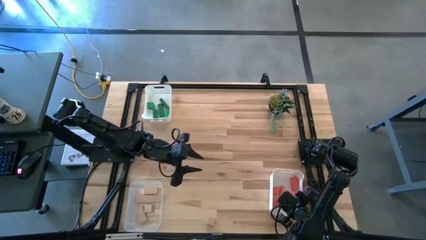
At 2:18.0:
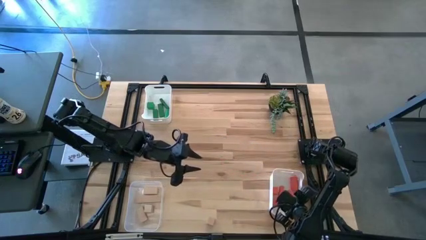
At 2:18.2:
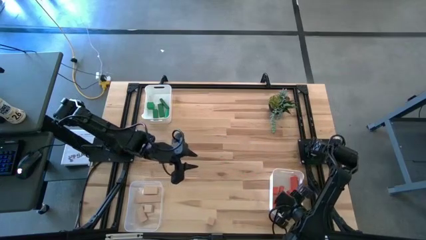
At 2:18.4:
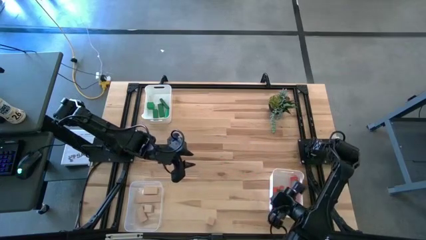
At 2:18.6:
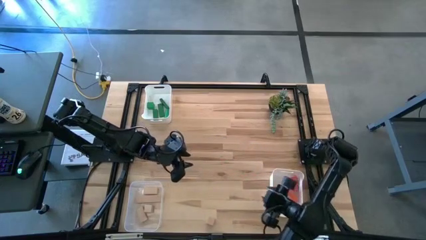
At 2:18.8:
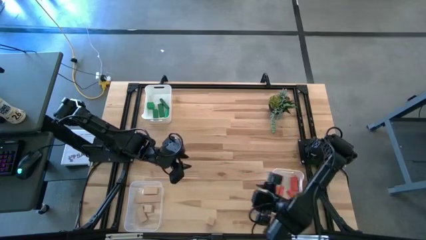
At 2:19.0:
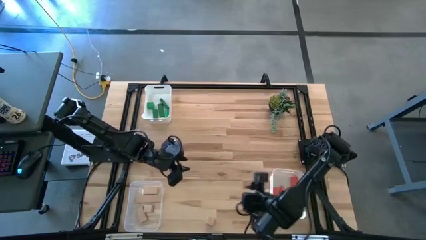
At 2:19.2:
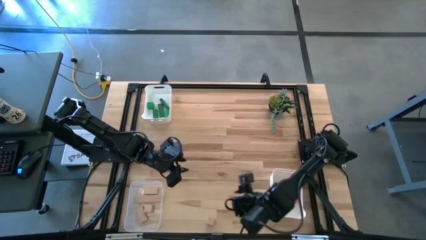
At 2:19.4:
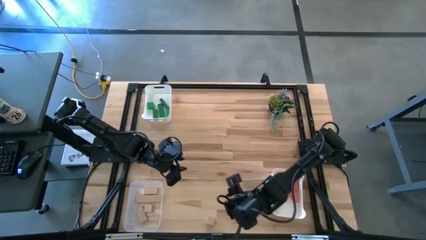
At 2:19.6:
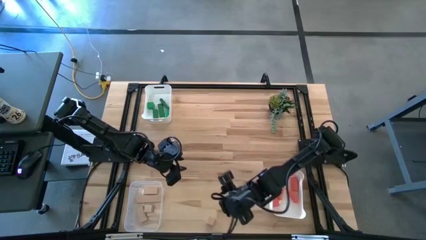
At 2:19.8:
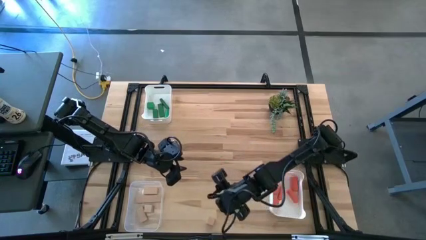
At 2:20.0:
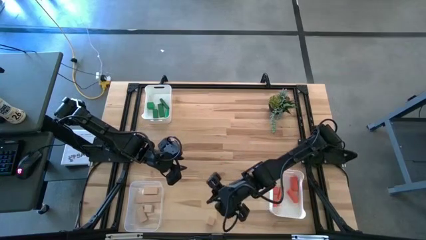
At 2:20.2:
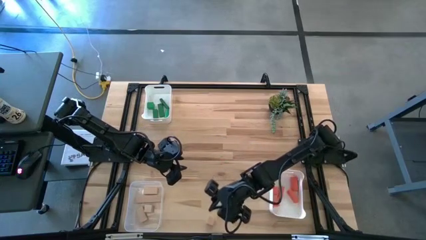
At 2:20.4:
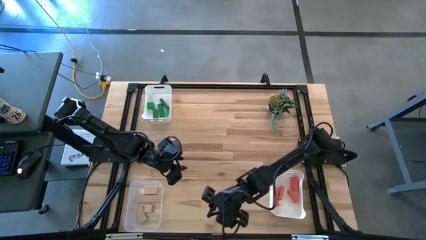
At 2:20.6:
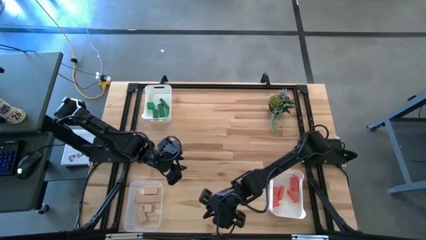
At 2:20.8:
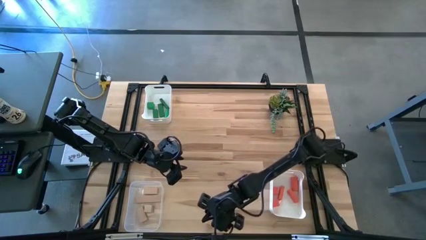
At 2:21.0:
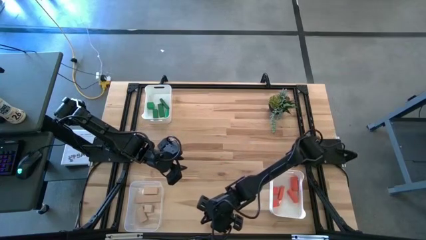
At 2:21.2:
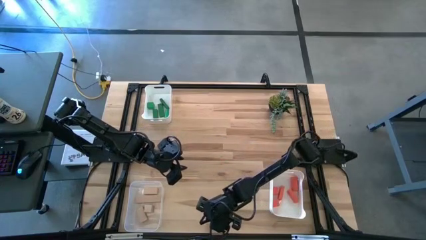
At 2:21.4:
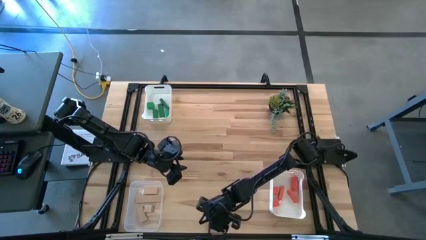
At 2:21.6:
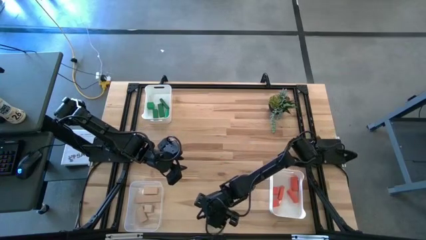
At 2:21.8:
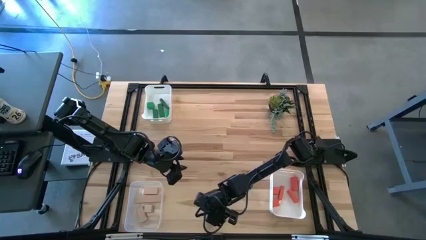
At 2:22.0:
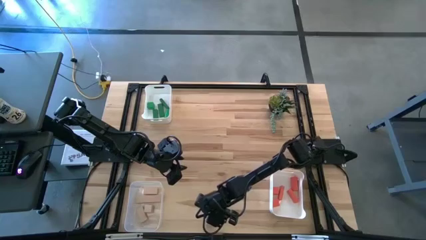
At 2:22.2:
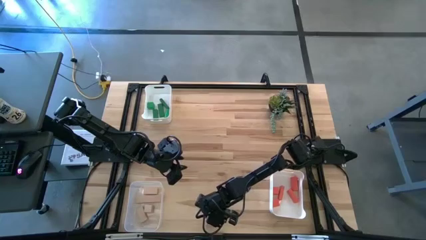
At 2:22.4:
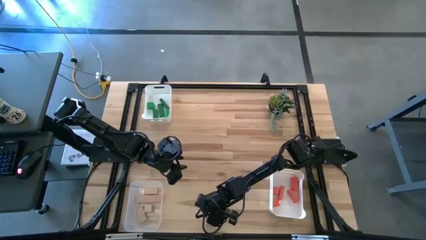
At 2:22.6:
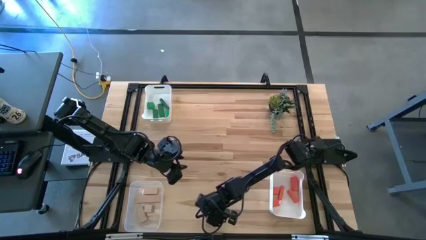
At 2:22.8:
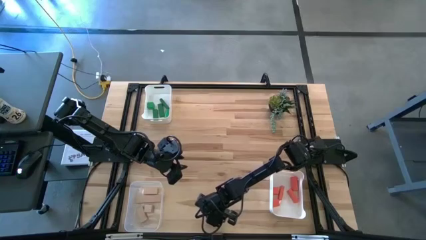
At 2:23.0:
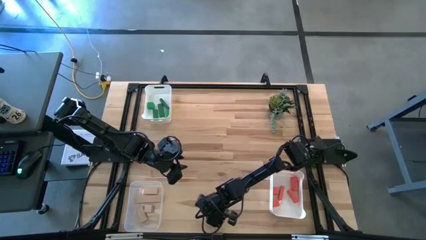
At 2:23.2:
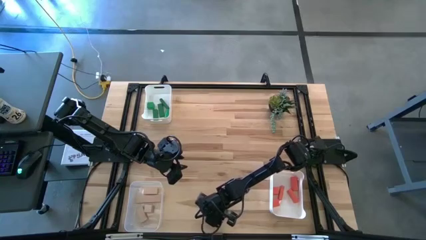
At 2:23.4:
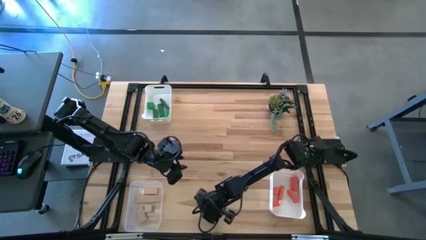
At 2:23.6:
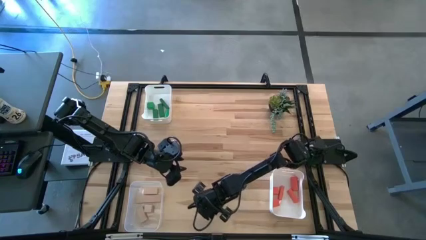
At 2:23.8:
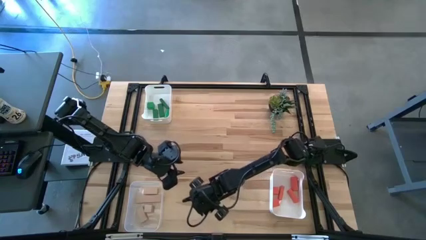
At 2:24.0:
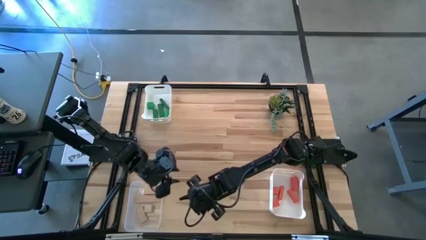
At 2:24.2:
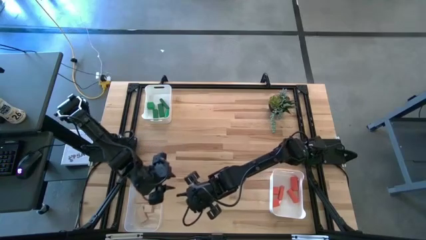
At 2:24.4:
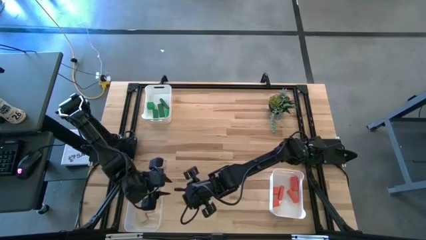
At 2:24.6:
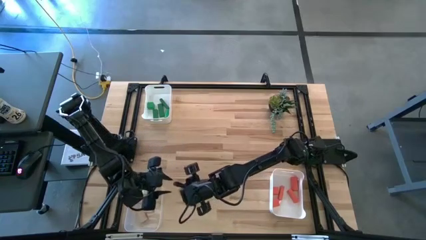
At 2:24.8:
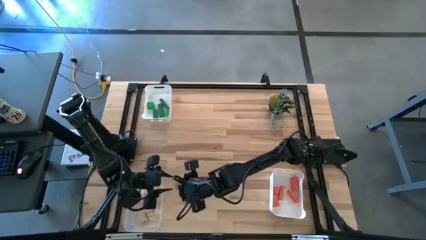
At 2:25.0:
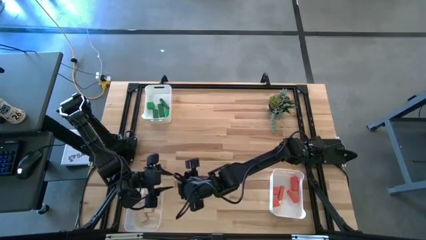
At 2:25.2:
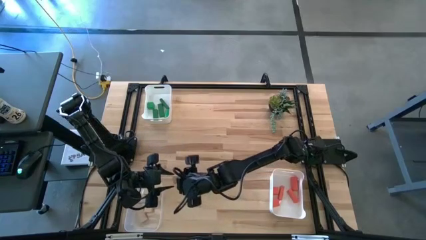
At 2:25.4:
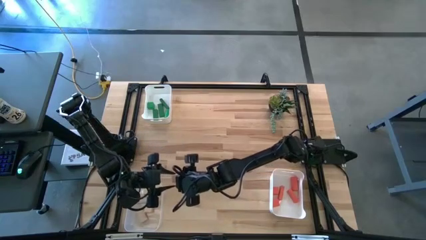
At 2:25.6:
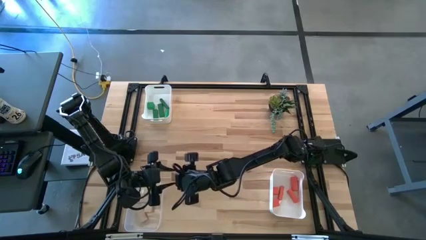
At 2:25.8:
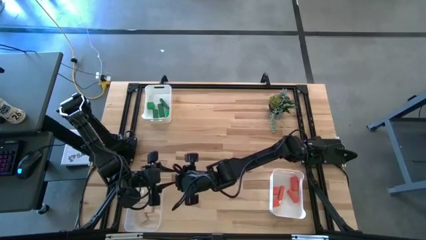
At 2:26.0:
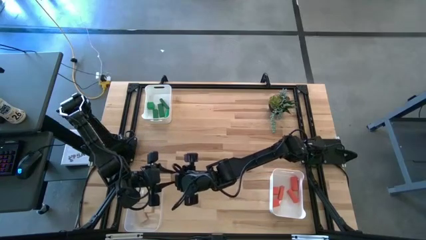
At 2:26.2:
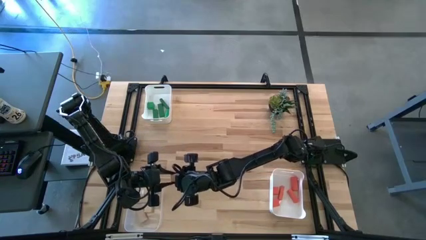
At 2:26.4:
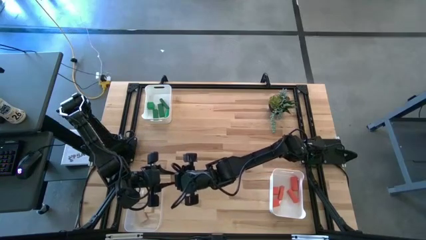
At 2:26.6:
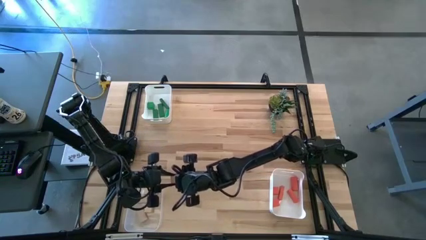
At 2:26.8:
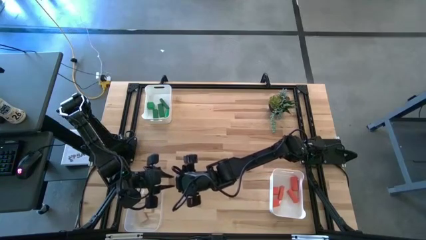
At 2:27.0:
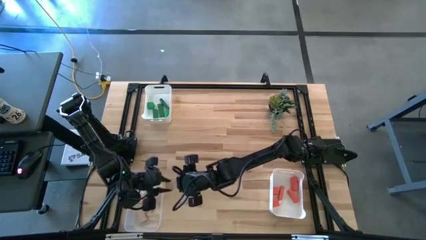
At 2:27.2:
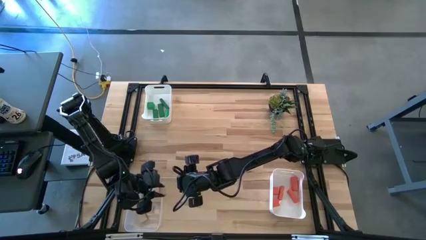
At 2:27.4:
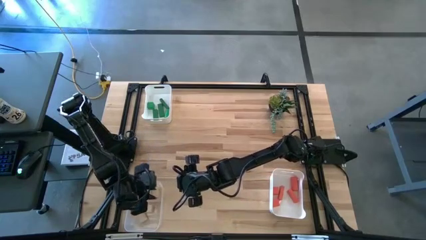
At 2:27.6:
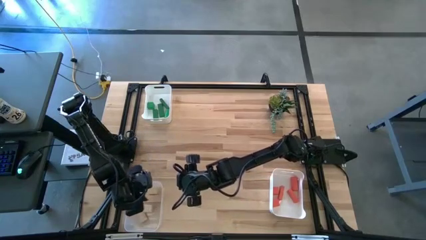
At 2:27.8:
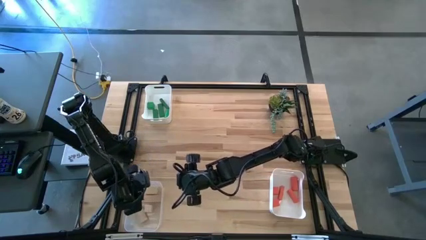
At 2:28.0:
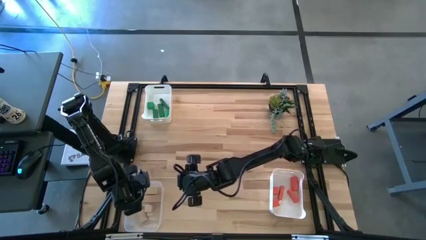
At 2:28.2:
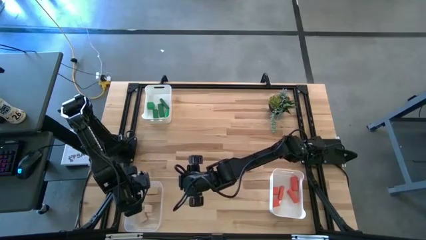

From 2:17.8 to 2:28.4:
Task: Sort & place blocks by color
Put the brown block into the transparent bin

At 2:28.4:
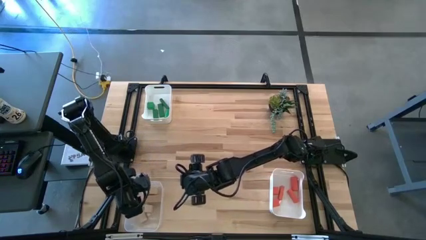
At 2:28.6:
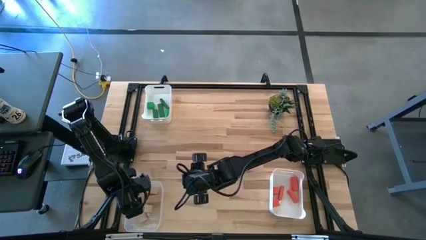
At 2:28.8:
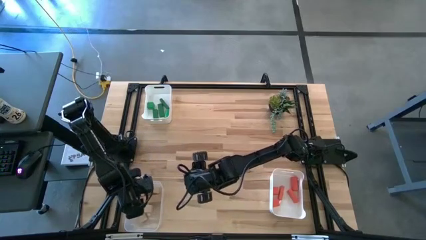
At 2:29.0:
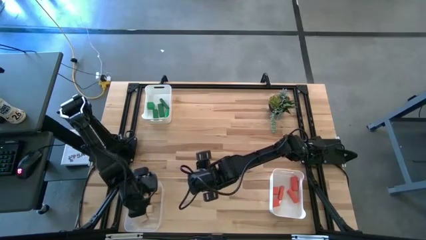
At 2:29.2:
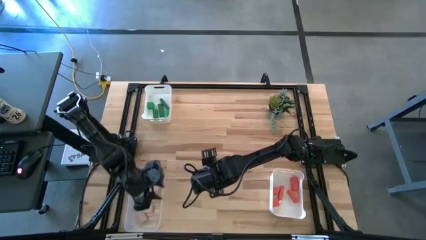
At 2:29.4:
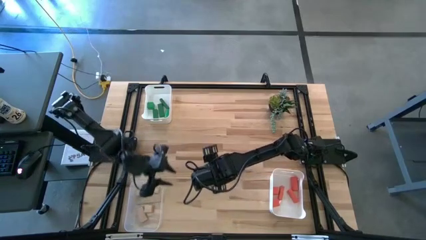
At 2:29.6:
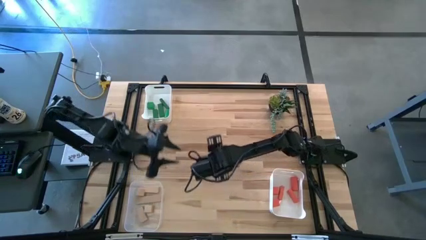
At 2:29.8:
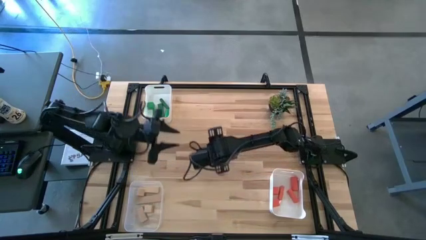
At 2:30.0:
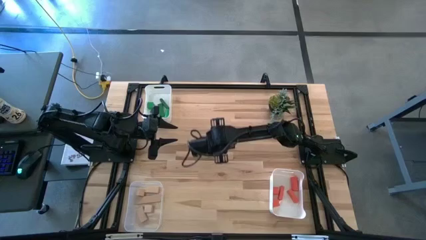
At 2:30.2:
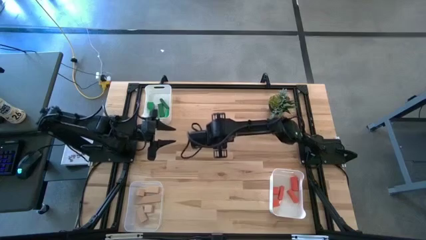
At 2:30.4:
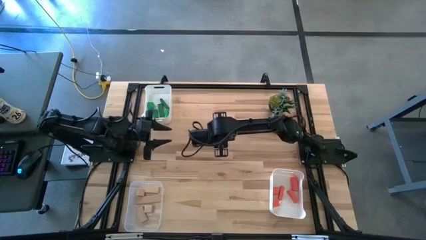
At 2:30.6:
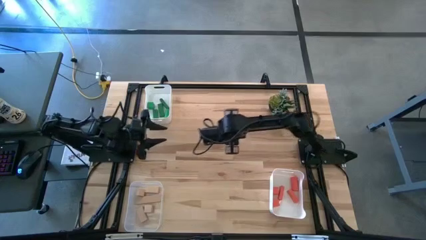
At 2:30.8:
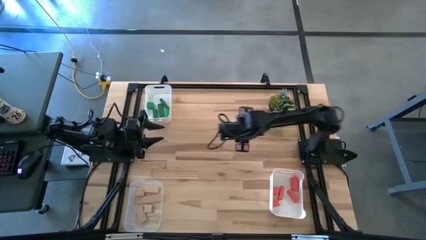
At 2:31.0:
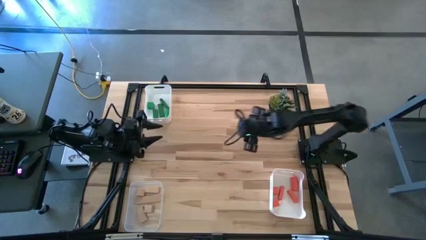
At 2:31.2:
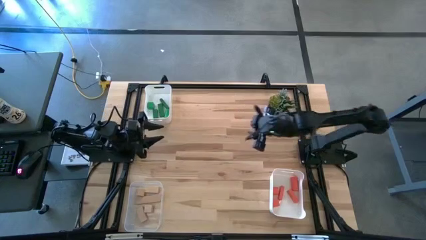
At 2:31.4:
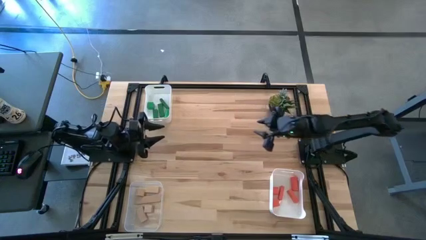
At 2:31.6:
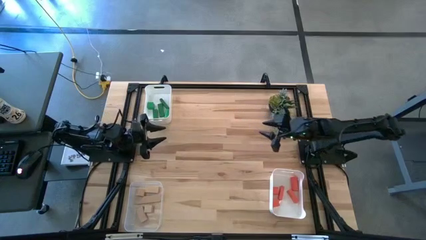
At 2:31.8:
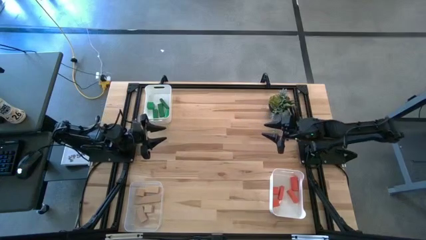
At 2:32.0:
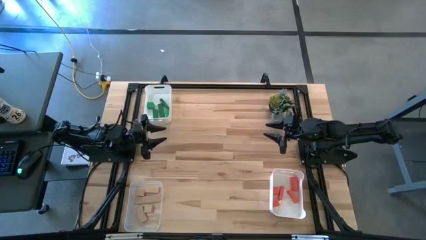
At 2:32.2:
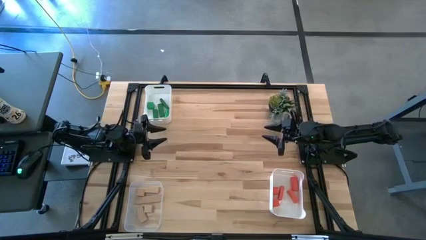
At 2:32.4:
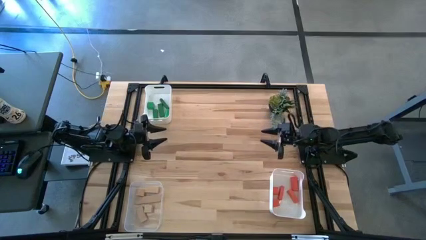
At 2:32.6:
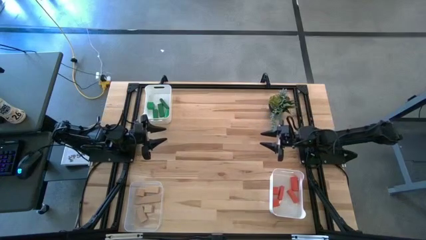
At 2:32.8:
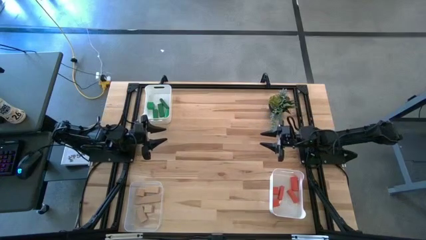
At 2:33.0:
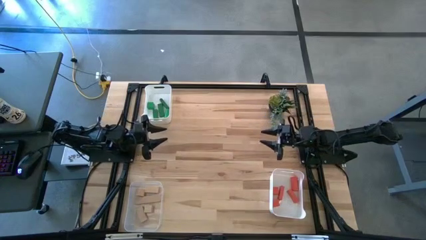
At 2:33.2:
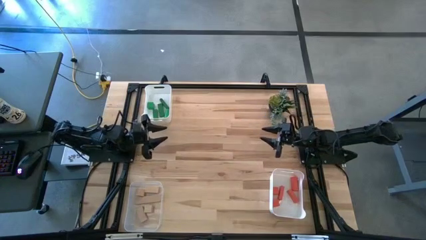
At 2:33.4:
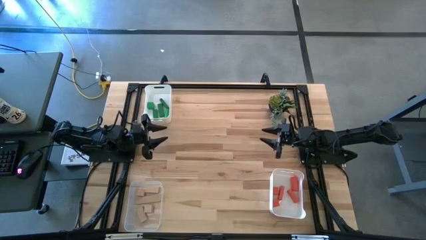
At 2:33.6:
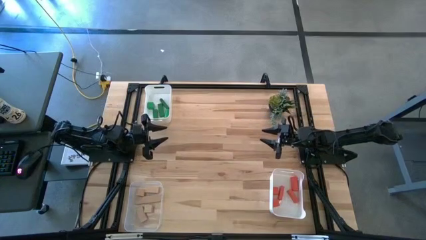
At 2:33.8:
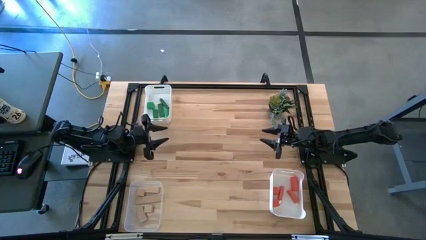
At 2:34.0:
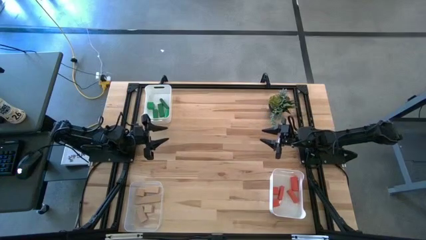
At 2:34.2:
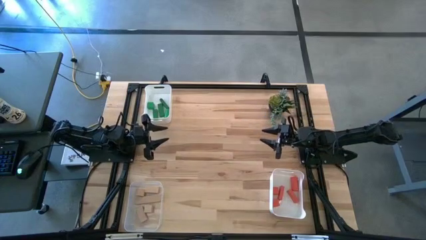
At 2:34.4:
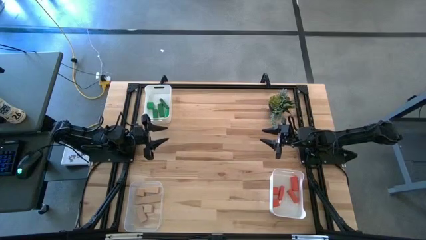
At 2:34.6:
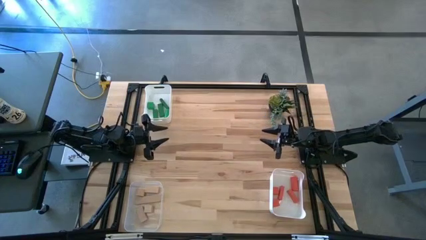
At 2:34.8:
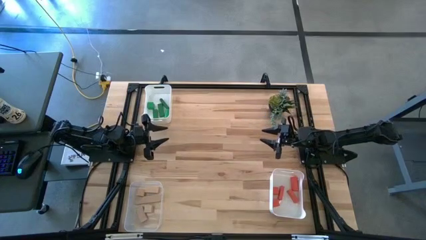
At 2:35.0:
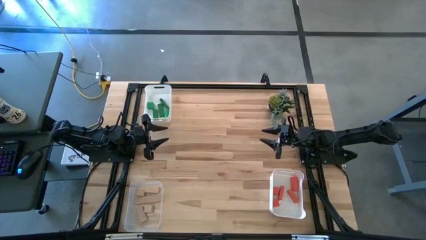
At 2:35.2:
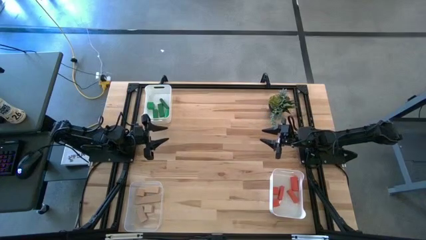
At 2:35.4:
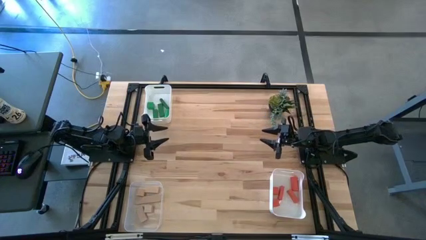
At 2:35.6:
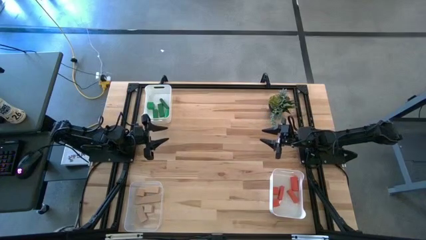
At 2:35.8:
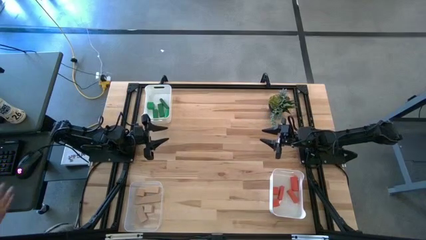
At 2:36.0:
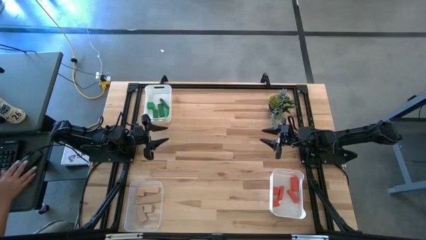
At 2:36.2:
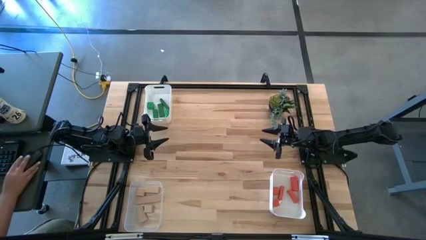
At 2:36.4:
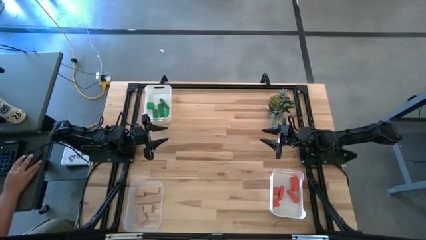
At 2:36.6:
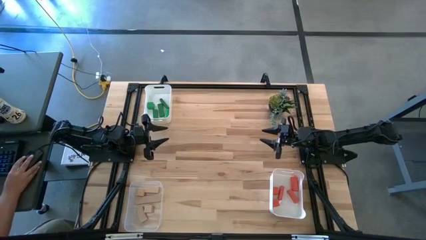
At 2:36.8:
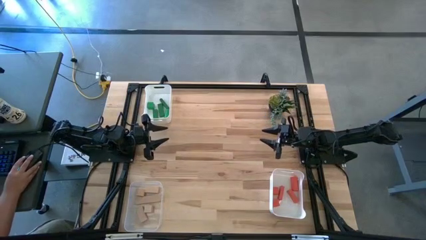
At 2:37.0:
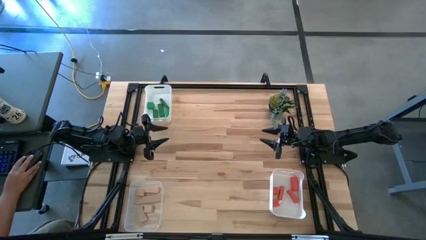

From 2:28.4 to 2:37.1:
Return to Home Position
